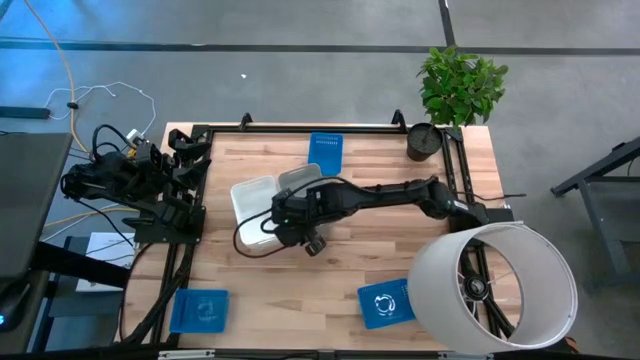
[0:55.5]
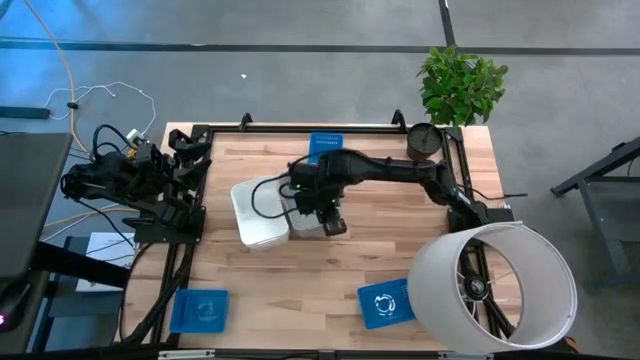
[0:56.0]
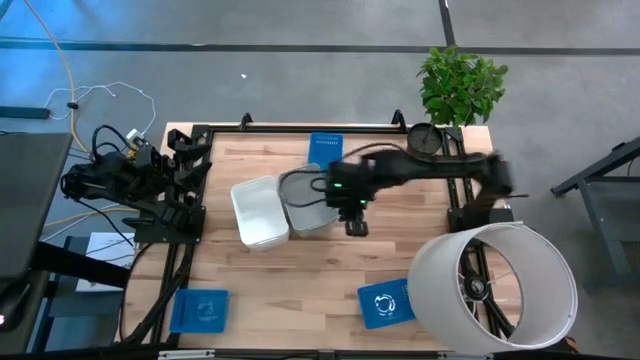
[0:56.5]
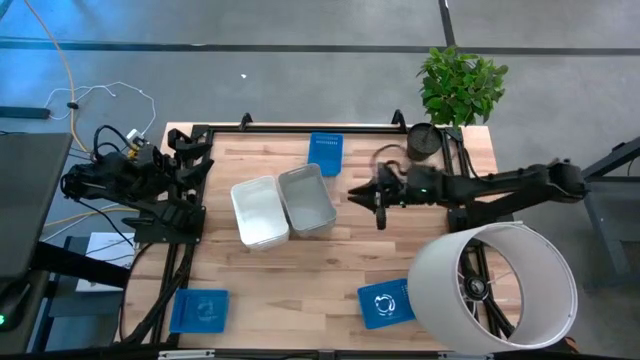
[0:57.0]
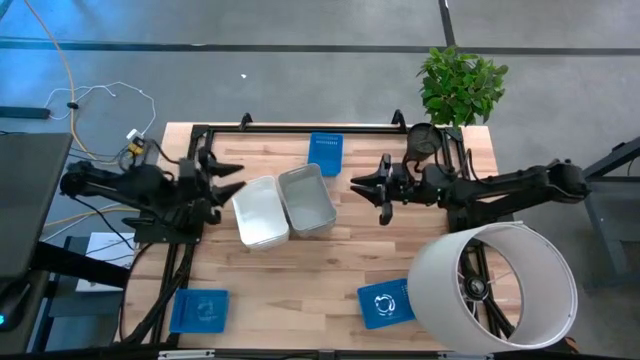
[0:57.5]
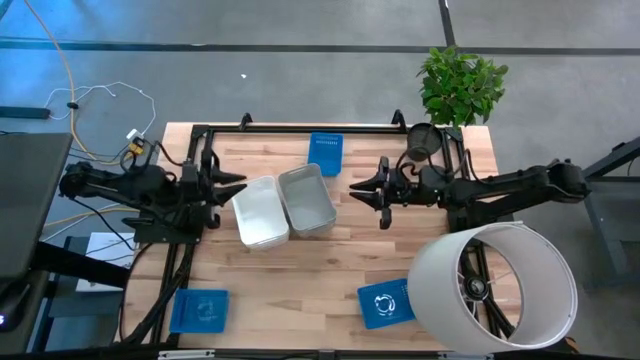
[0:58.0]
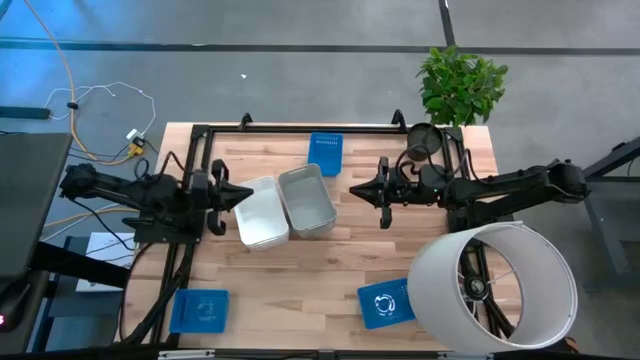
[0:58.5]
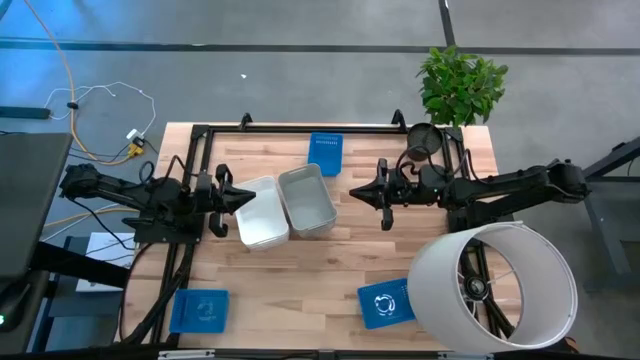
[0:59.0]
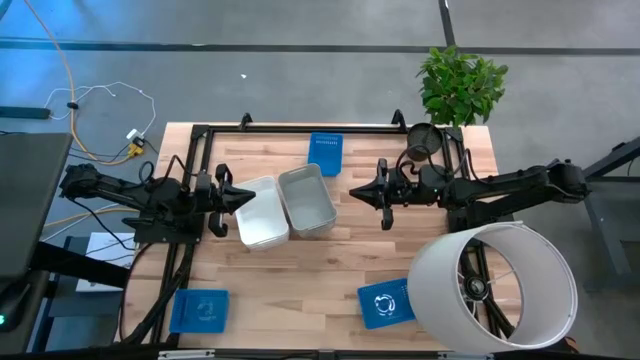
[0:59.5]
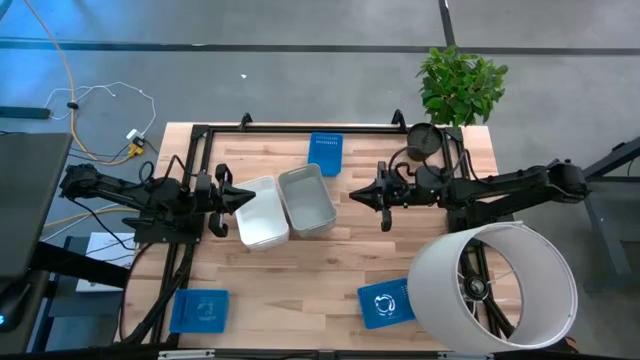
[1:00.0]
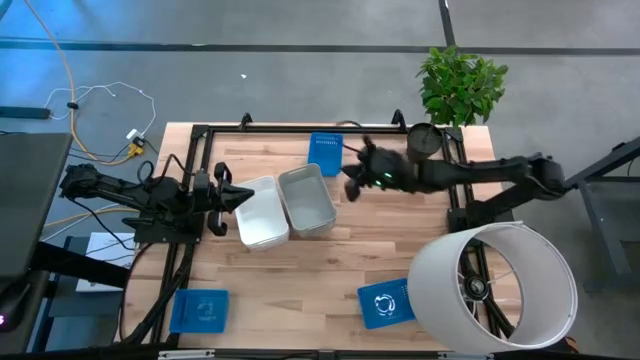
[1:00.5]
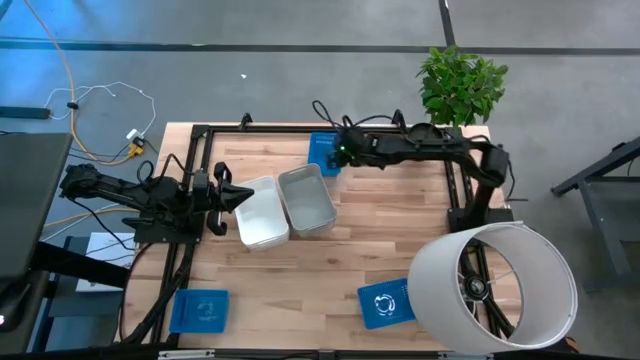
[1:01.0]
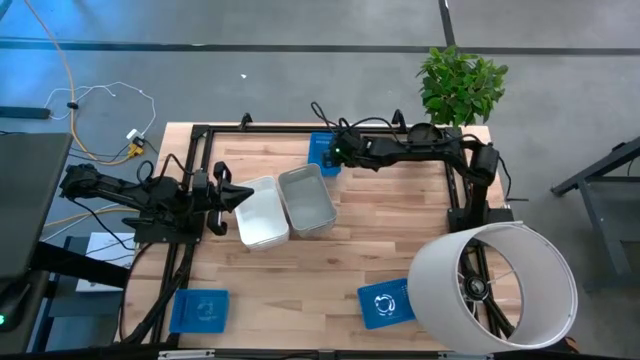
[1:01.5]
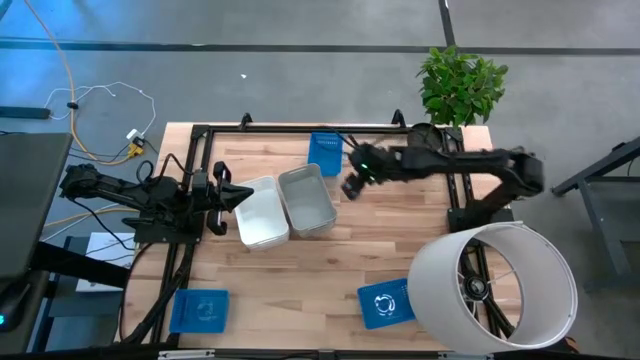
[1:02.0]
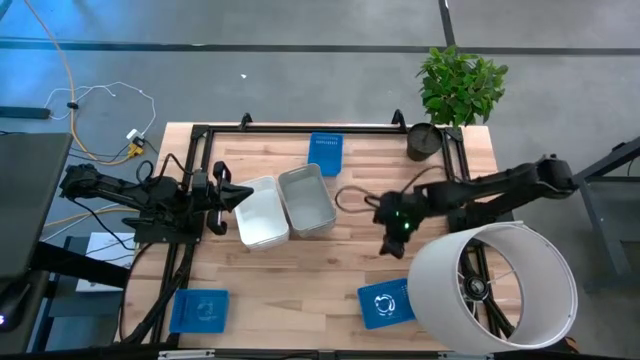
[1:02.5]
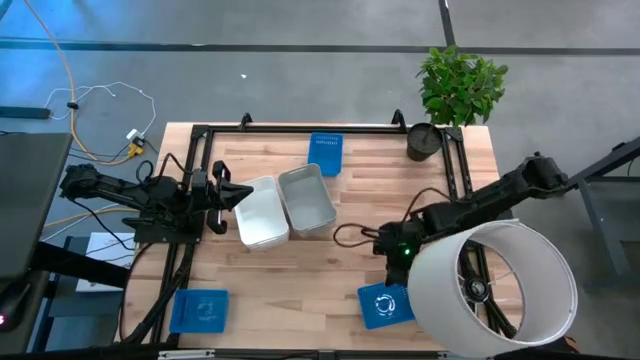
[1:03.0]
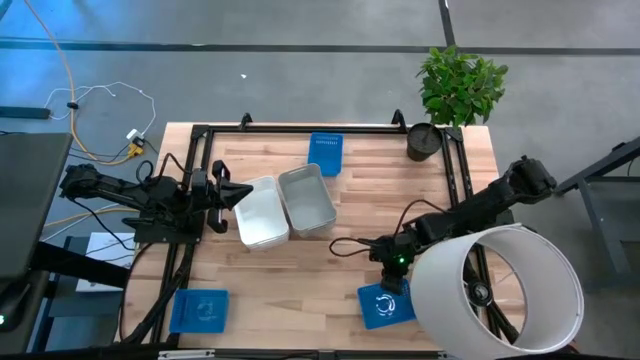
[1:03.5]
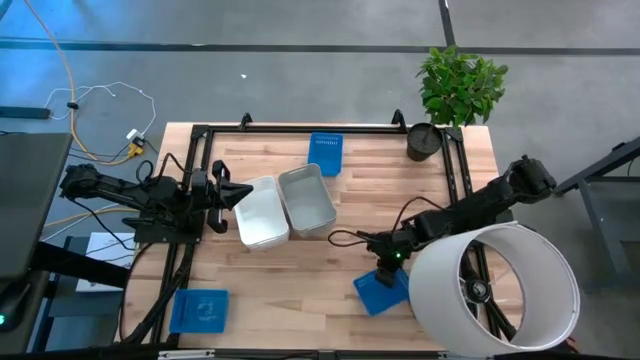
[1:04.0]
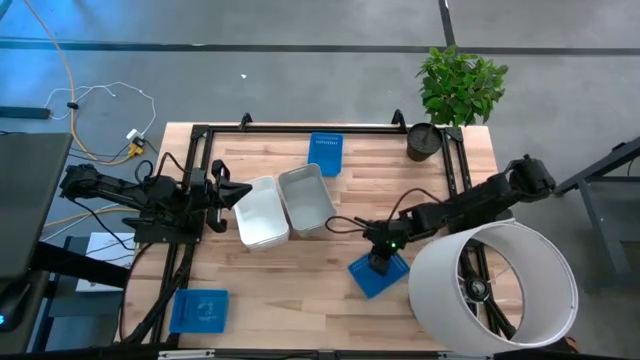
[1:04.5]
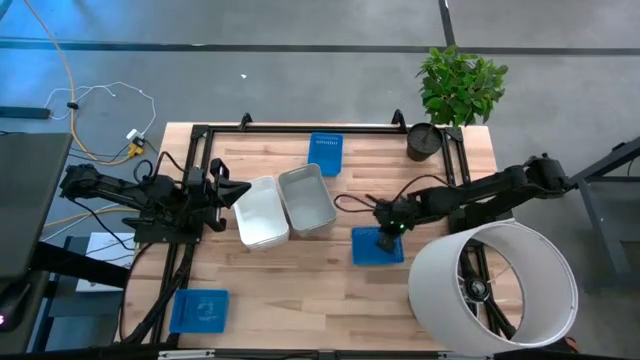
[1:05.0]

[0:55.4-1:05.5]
Move the bottom right blue bin to the middle right of the table

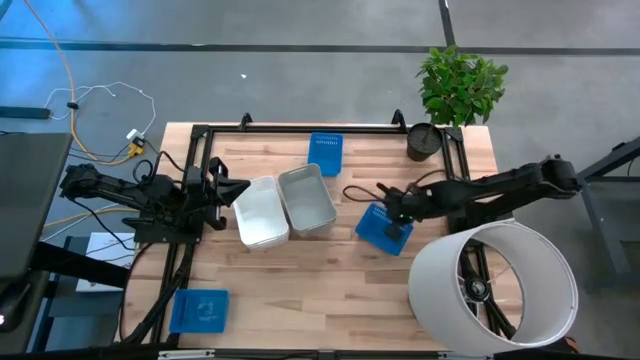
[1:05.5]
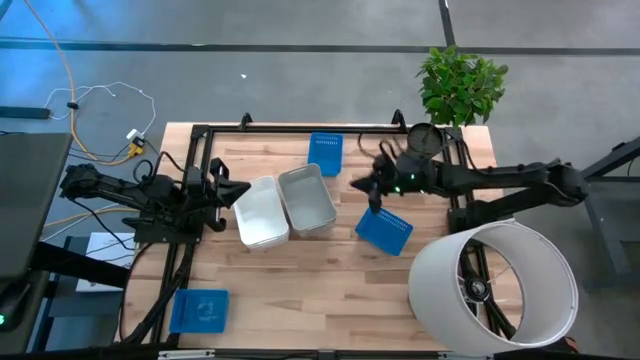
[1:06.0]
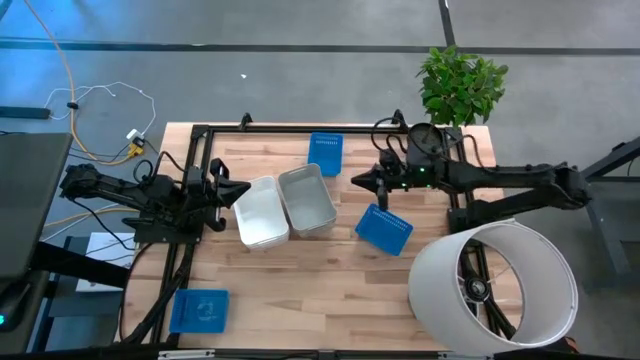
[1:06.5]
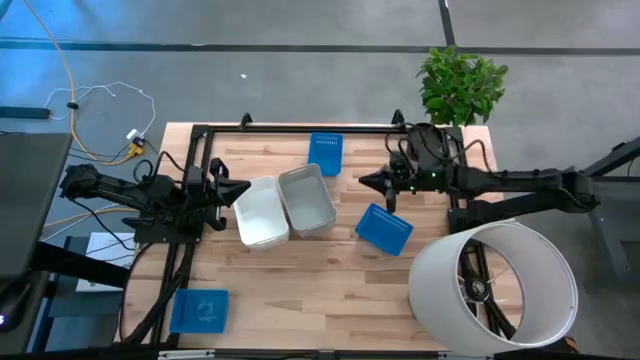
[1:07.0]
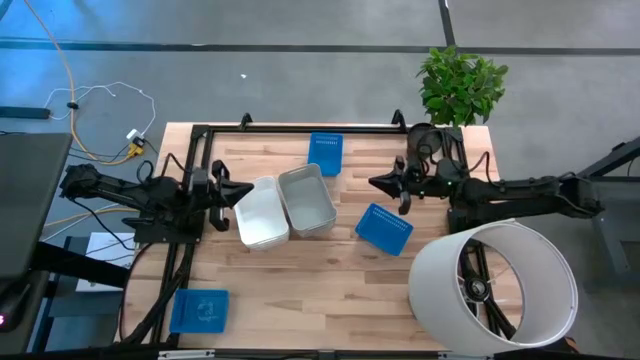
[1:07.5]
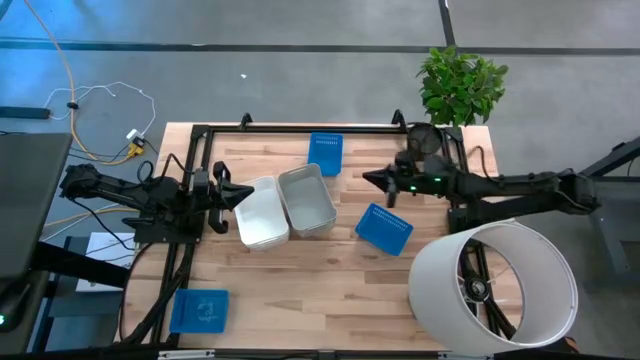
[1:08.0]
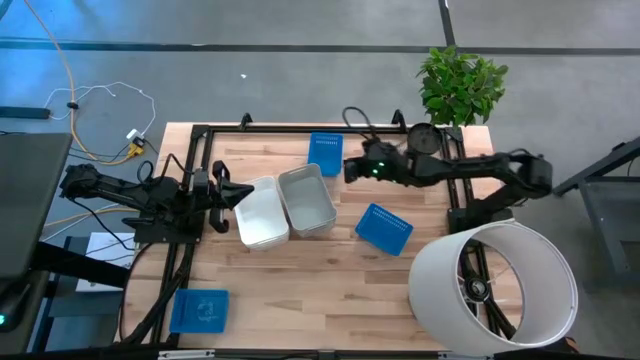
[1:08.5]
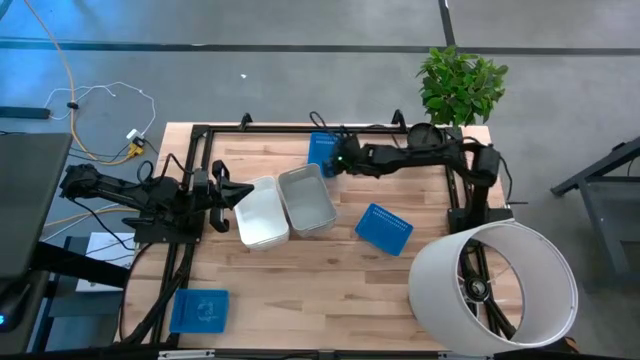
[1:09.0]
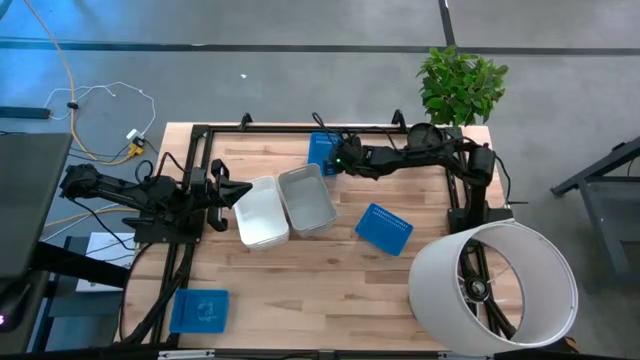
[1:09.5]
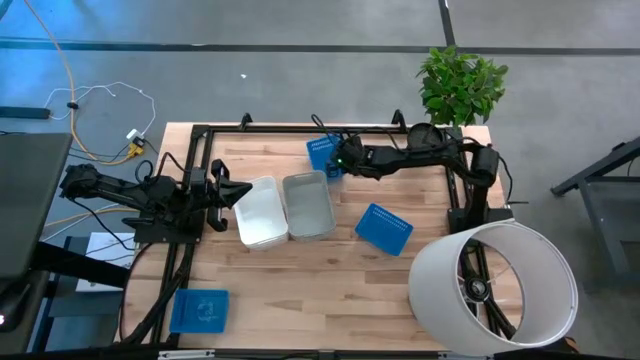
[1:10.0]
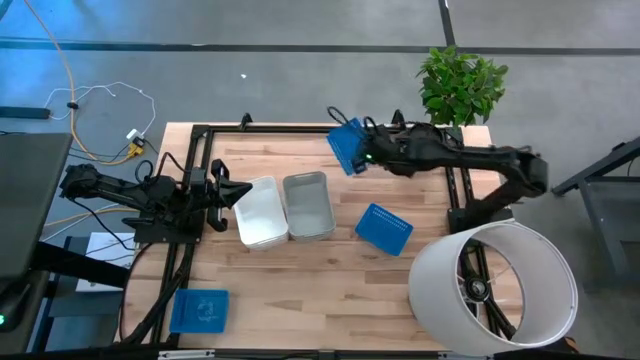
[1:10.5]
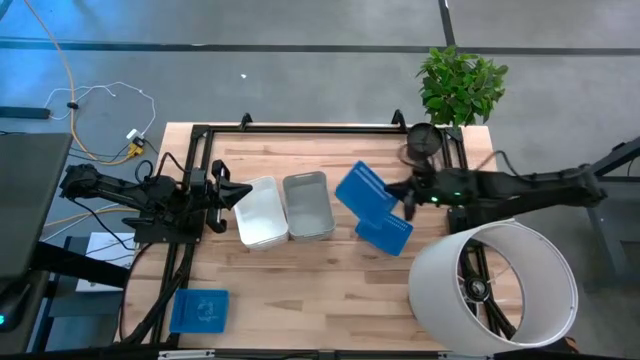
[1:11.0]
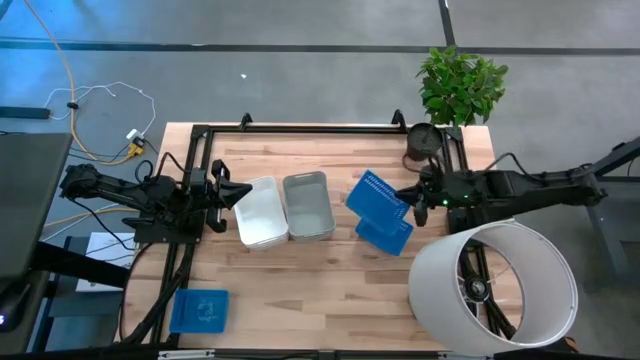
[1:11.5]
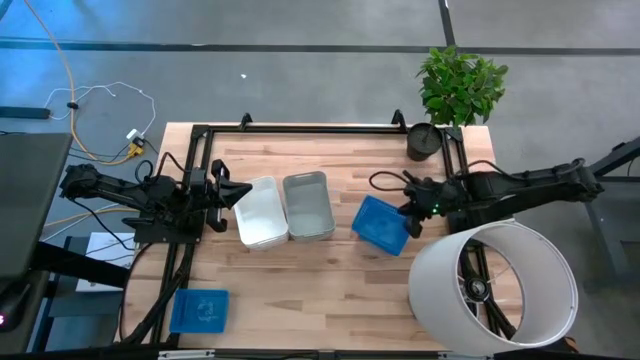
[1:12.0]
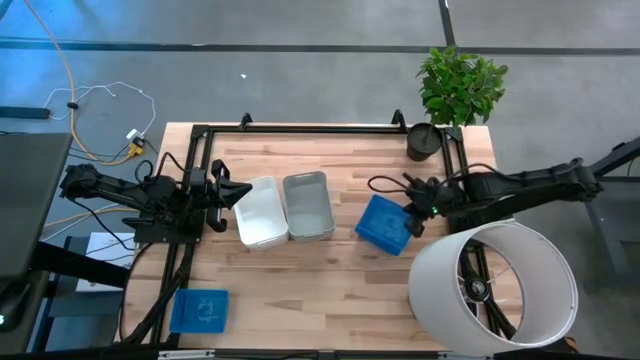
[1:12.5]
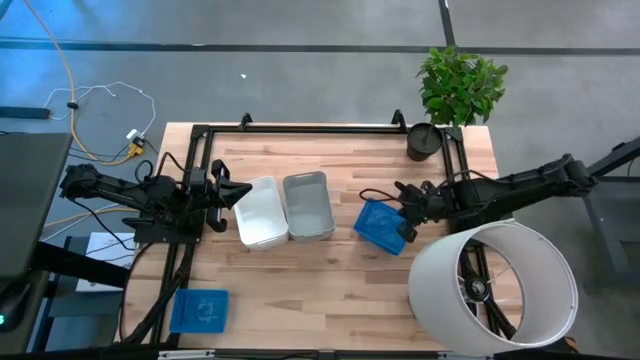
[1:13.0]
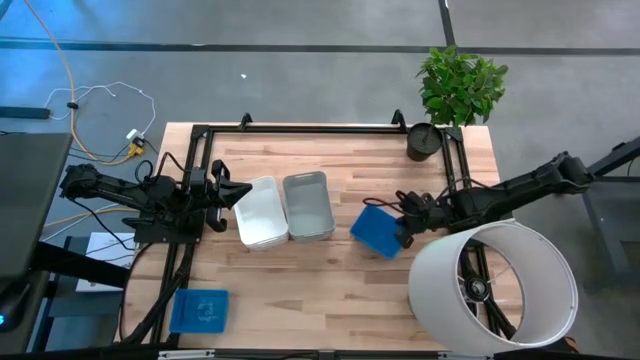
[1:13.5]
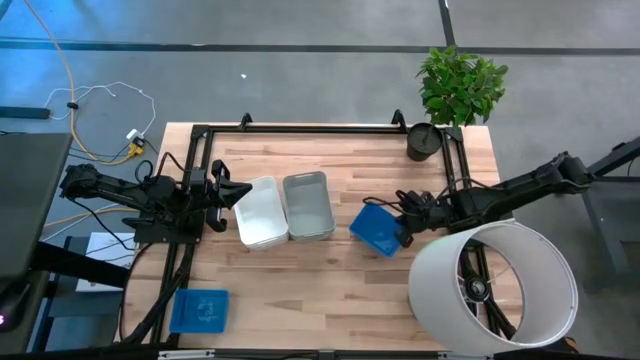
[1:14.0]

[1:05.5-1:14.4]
Stack the top blue bin on top of the right blue bin
